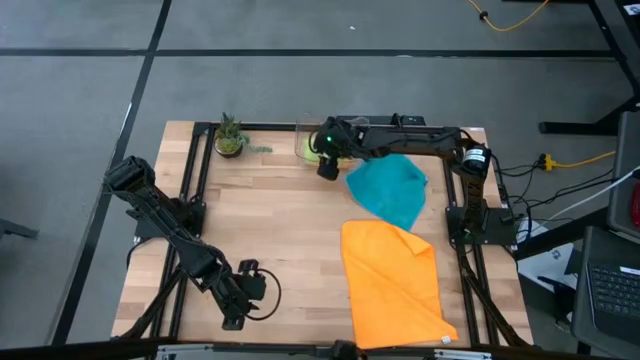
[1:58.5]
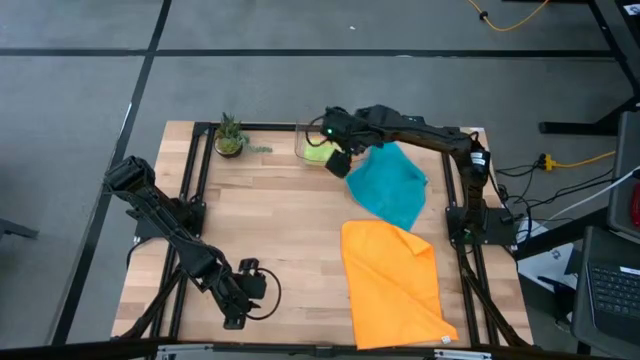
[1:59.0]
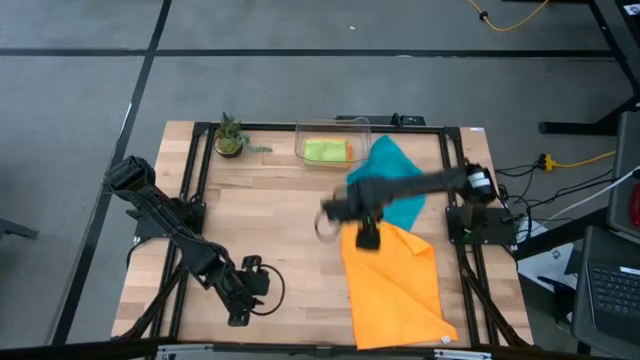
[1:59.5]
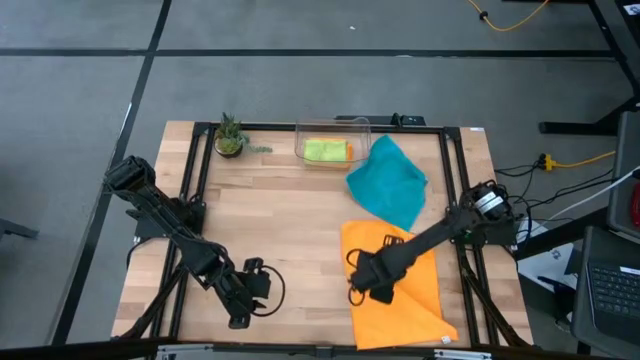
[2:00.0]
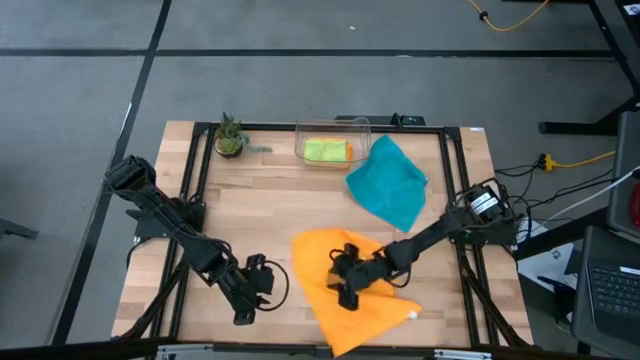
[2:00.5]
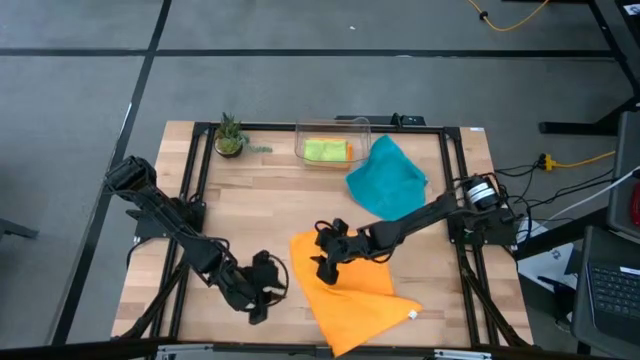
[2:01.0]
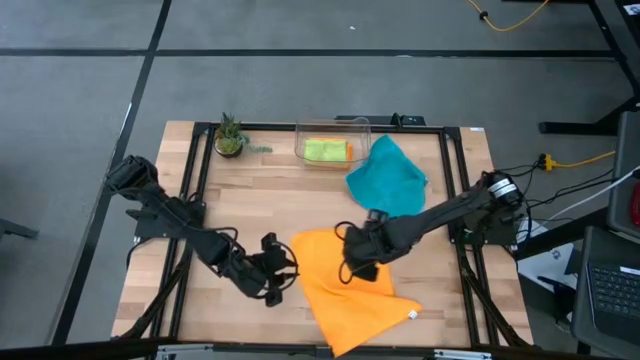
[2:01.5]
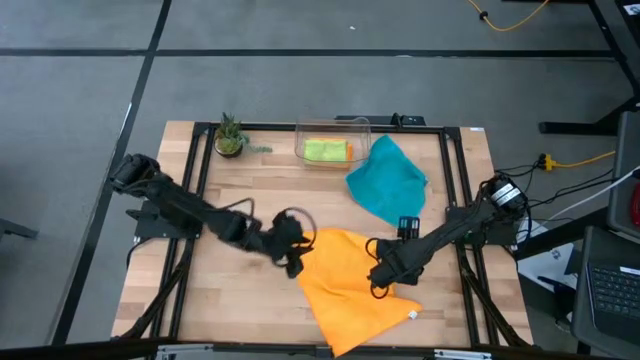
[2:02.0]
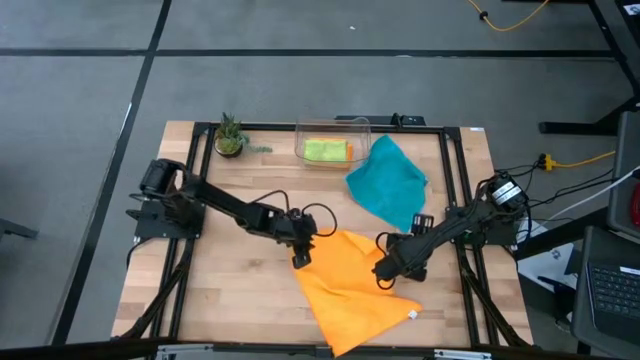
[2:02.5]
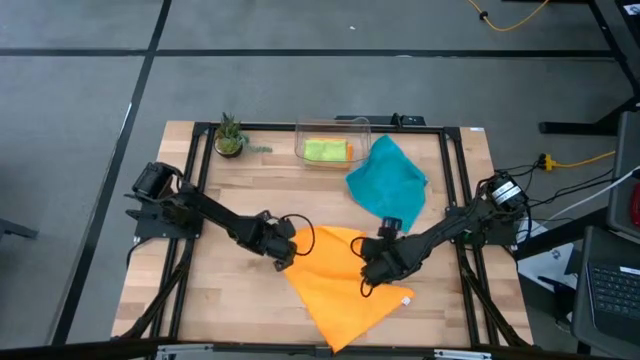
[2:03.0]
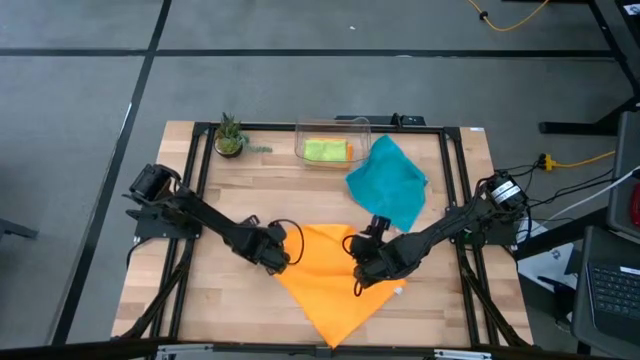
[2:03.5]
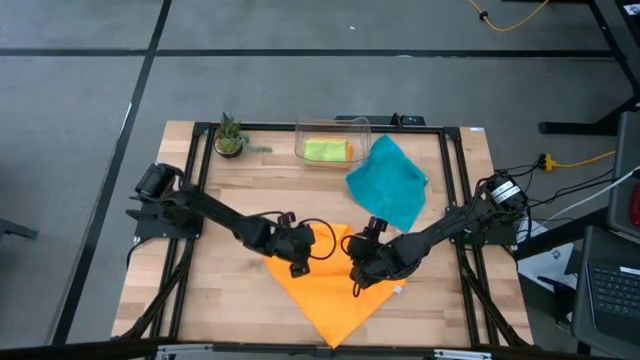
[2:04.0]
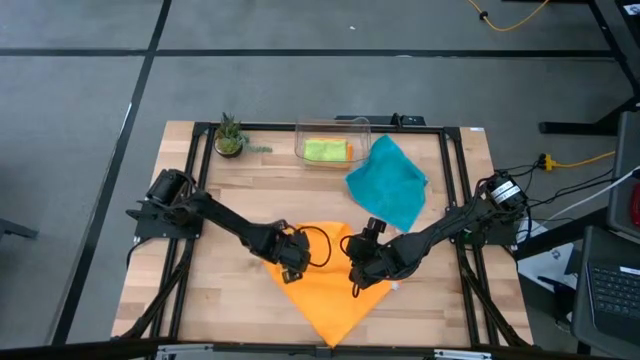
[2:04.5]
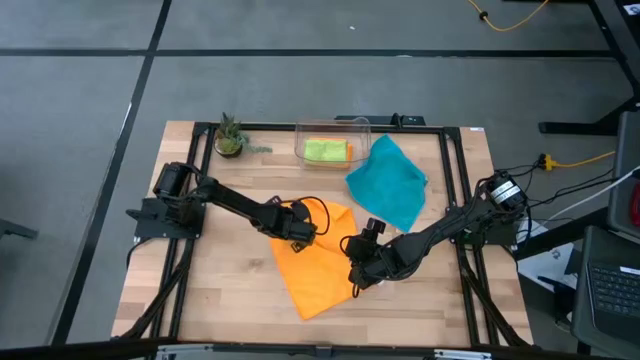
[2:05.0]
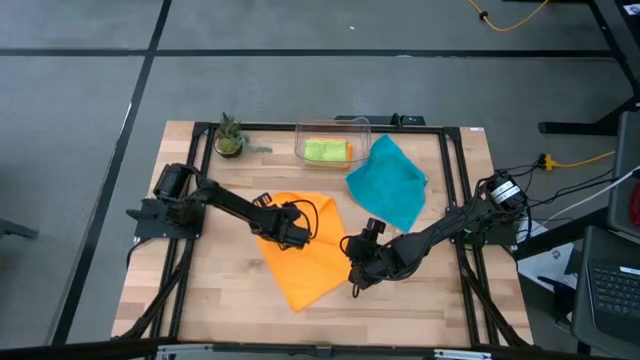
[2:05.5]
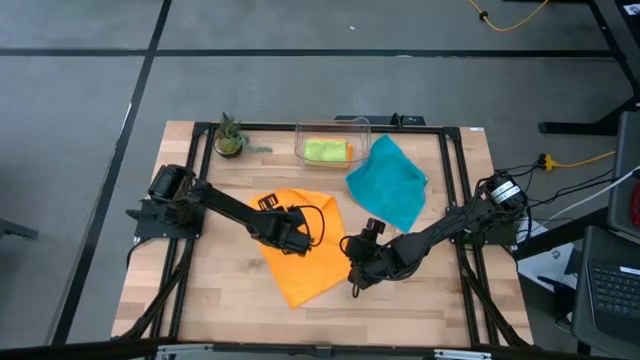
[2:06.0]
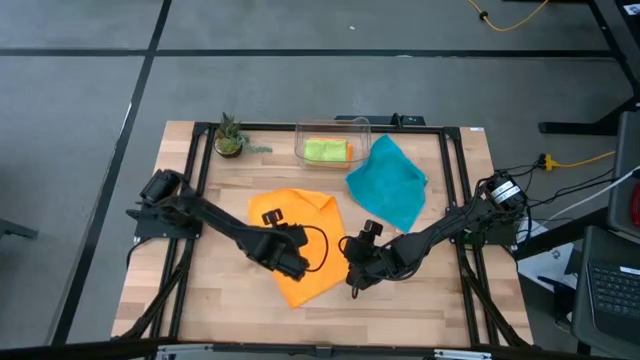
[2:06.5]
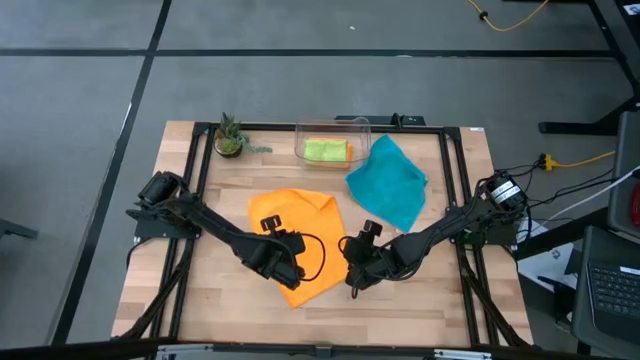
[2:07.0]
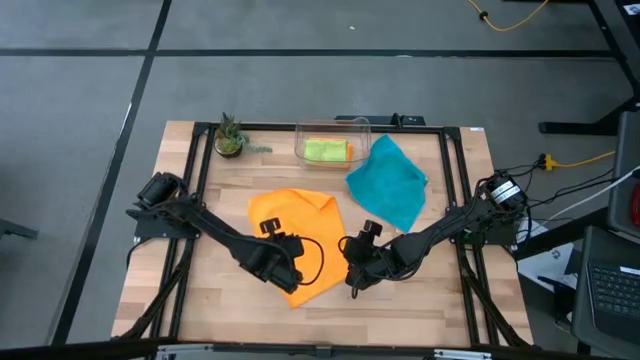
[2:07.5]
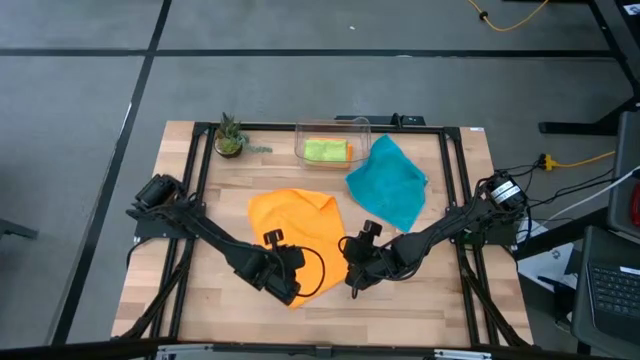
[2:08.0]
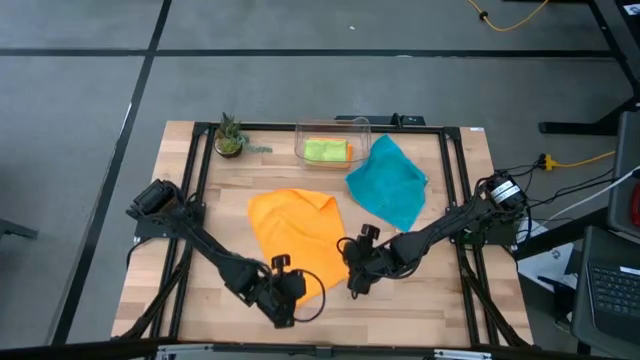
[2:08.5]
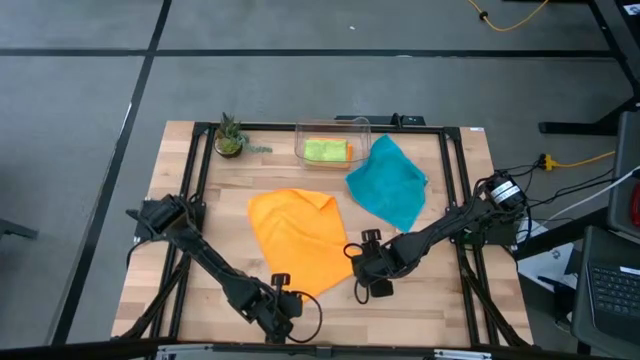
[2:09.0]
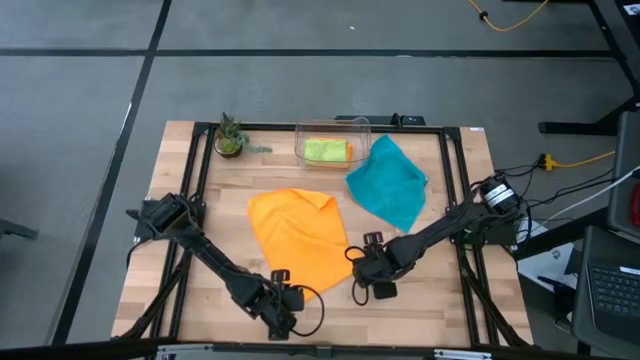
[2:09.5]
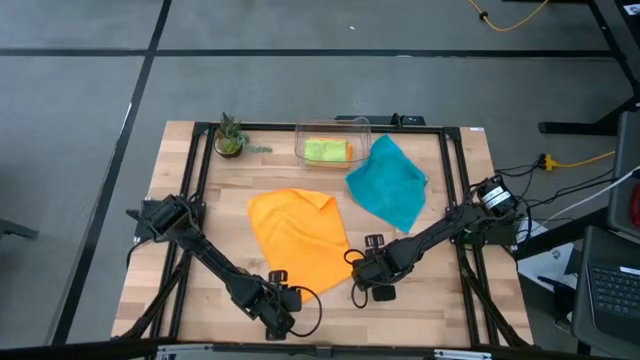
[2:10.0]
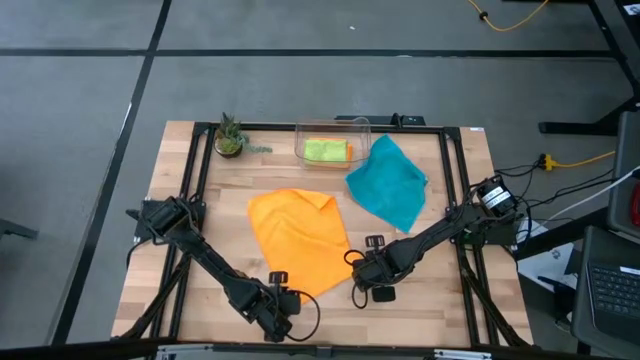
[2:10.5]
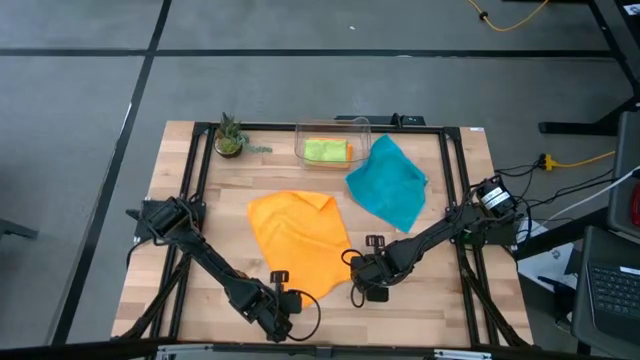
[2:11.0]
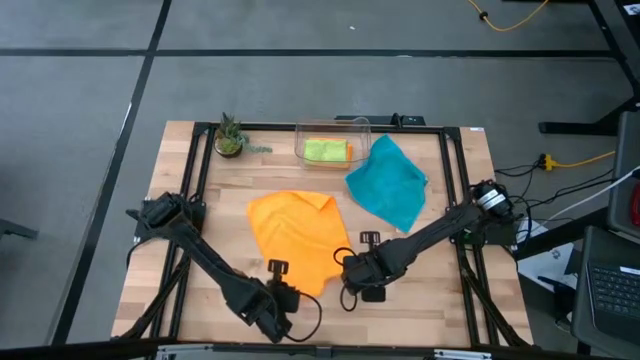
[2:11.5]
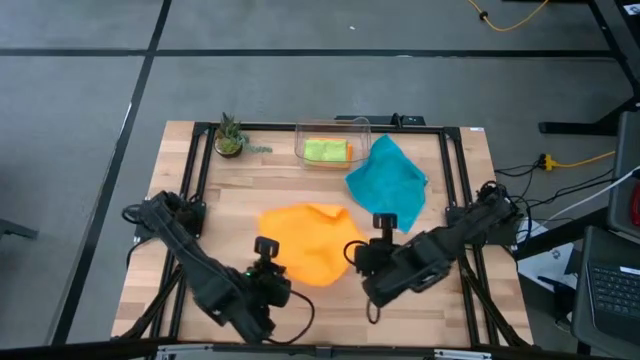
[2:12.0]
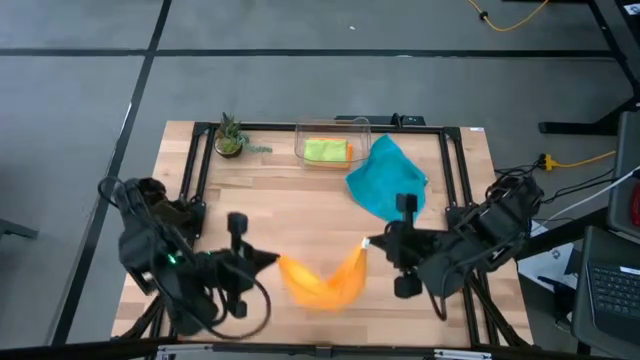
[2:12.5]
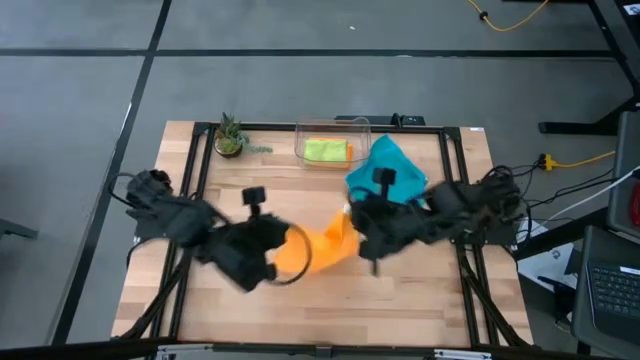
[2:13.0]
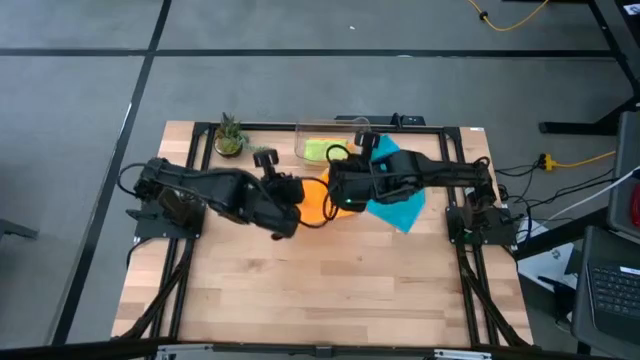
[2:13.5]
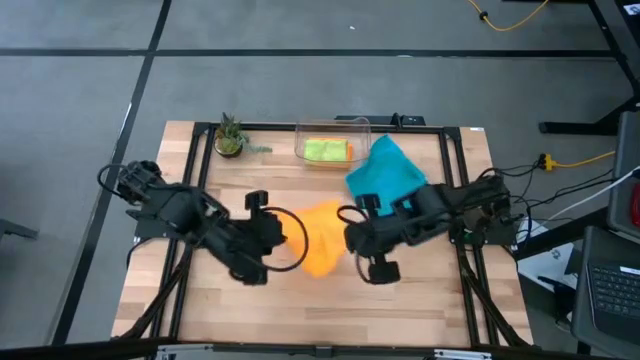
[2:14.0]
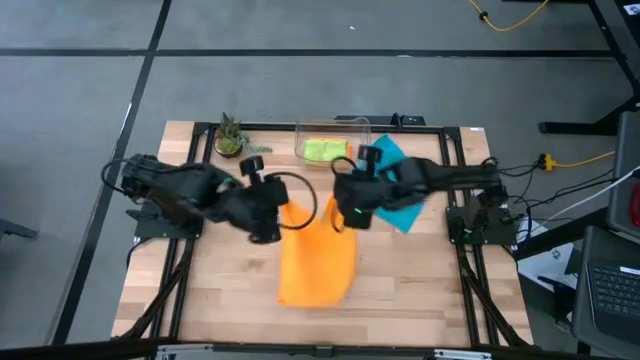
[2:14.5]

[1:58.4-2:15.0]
Task: Fold microfiber towels
Fold the orange microfiber cloth

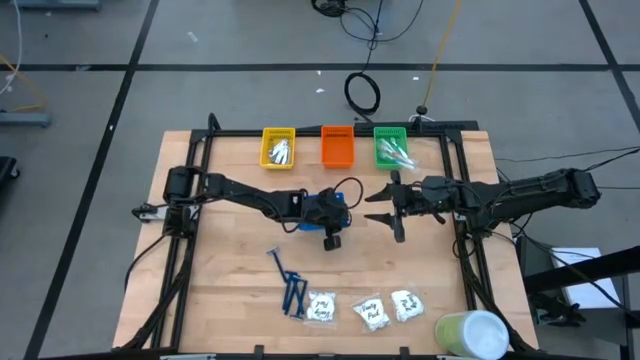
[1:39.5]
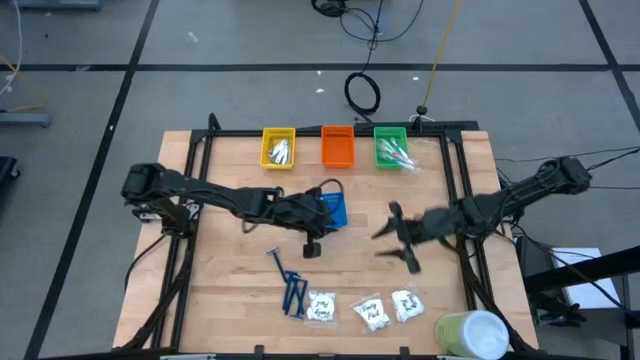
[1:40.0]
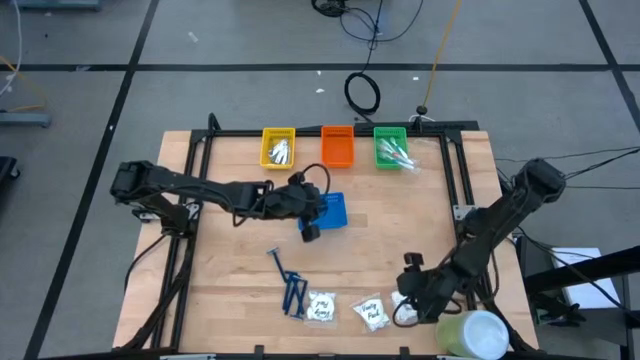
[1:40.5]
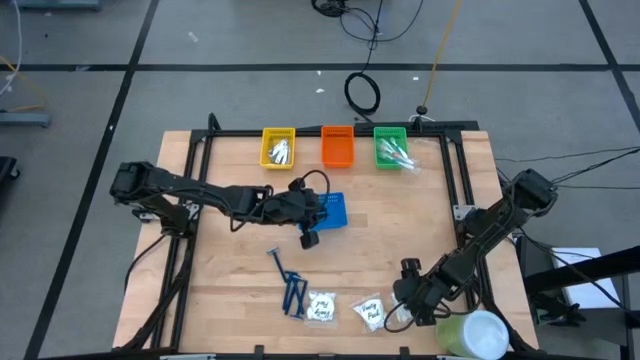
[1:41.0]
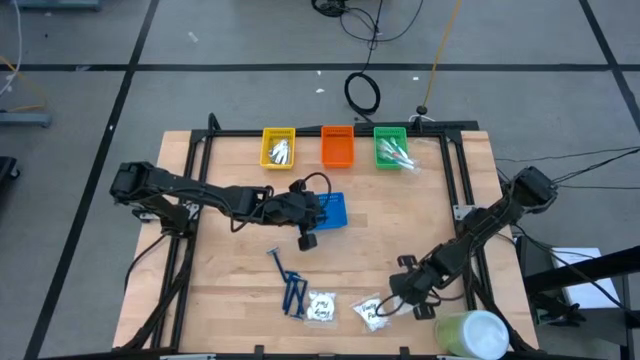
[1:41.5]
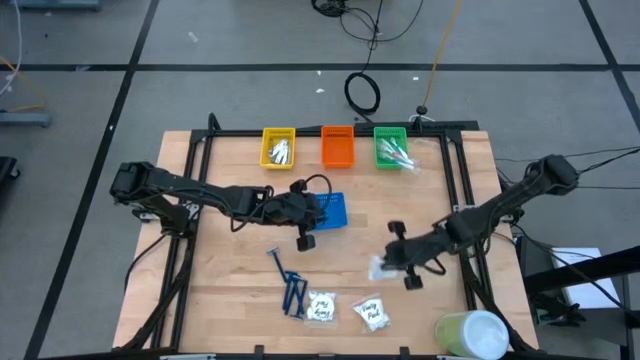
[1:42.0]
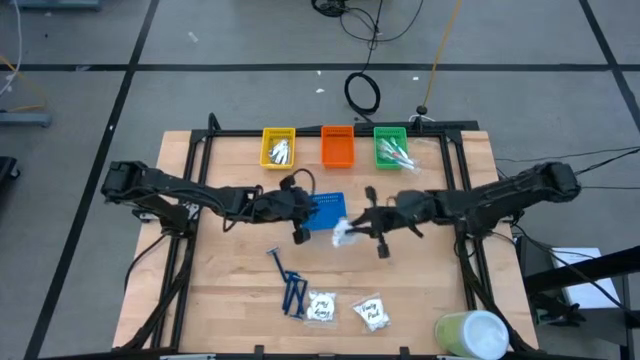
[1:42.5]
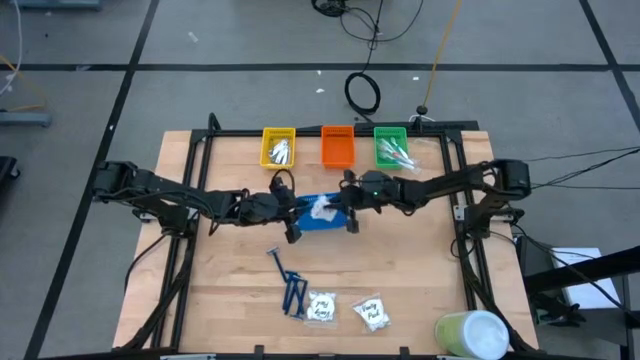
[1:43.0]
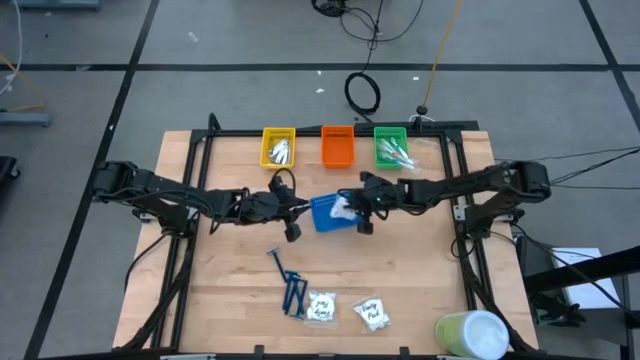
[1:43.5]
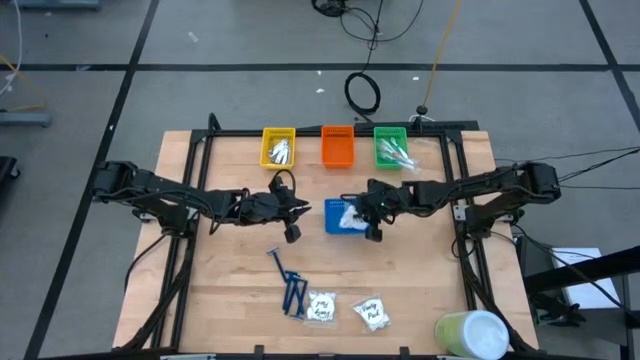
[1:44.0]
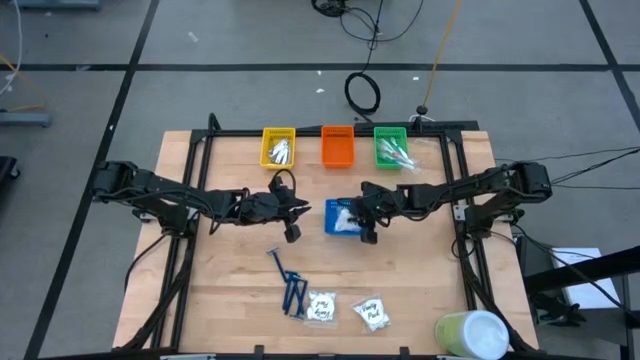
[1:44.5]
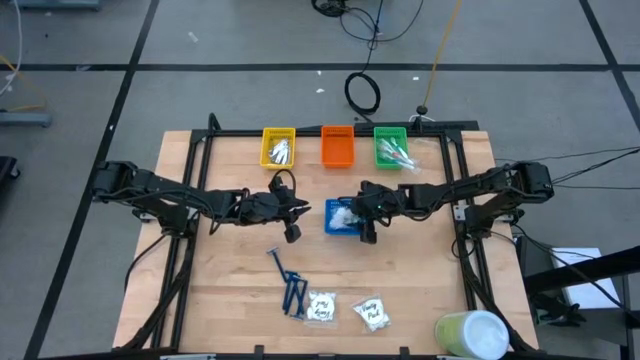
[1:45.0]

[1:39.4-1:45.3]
Task: Pick & Place Travel size toiletries
Put the white cotton pack into the blue basket
